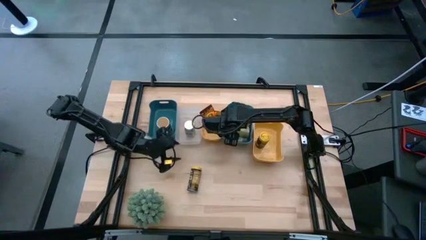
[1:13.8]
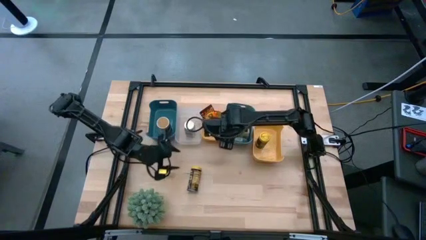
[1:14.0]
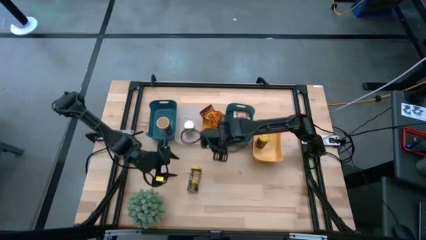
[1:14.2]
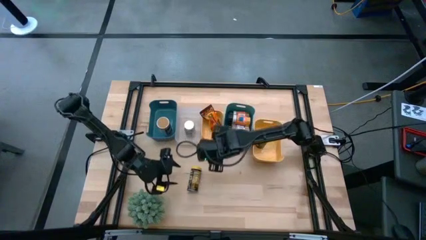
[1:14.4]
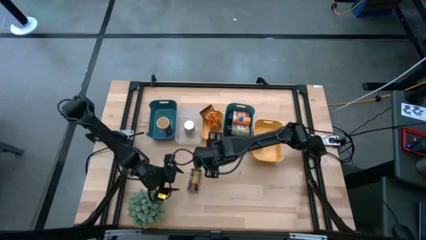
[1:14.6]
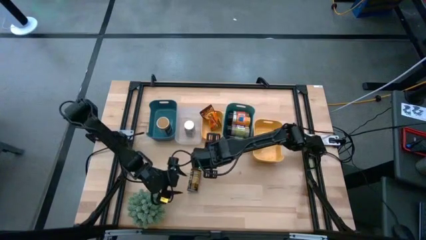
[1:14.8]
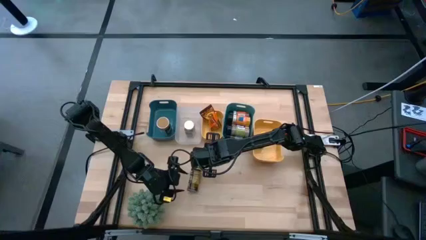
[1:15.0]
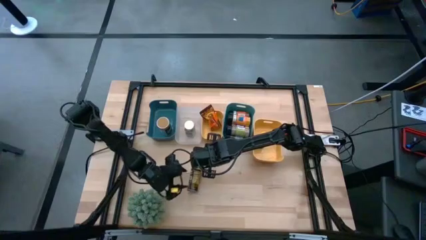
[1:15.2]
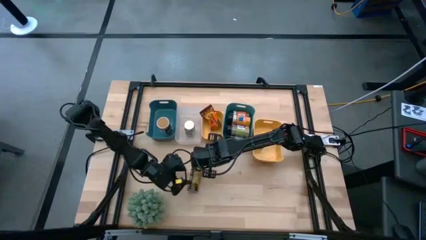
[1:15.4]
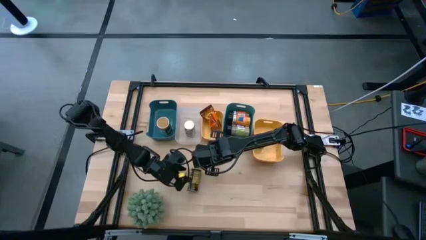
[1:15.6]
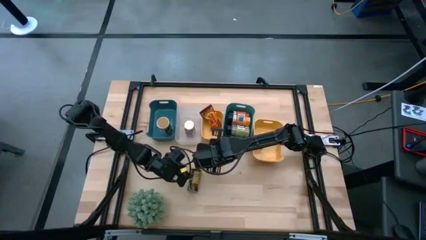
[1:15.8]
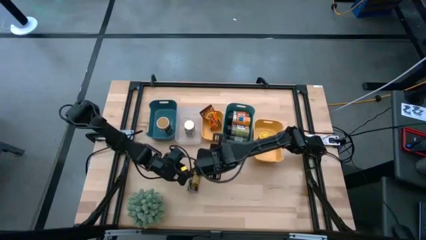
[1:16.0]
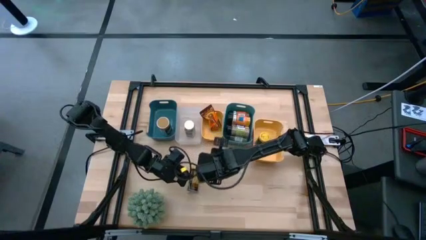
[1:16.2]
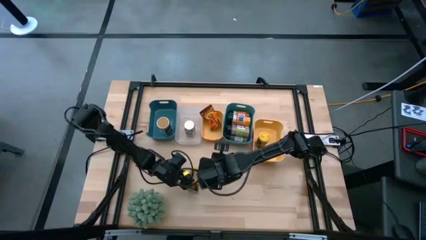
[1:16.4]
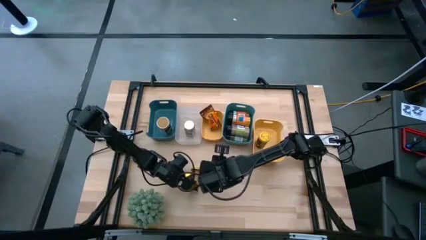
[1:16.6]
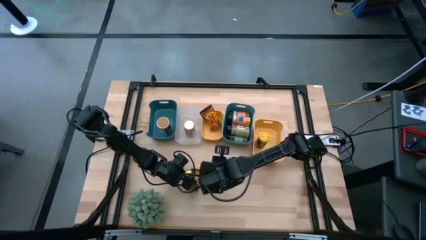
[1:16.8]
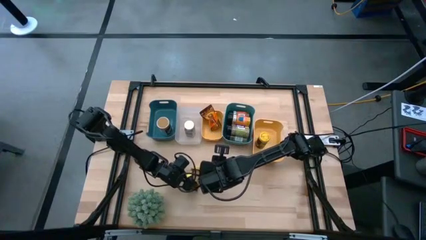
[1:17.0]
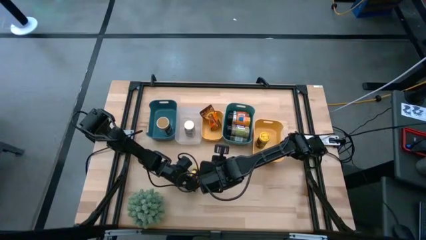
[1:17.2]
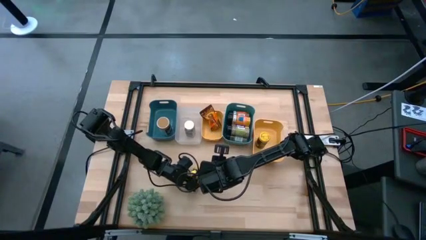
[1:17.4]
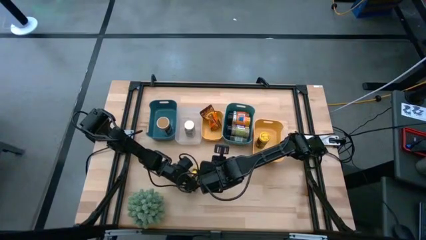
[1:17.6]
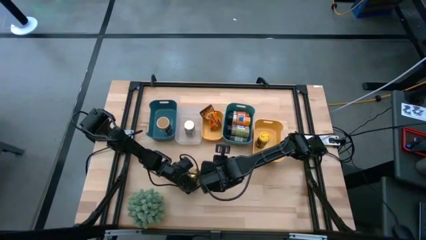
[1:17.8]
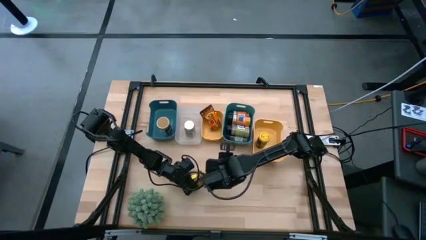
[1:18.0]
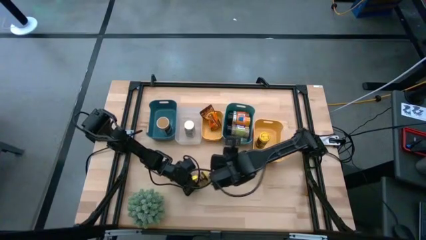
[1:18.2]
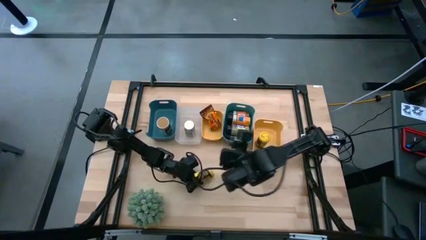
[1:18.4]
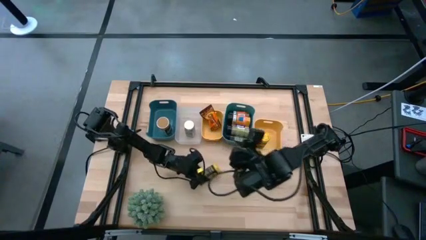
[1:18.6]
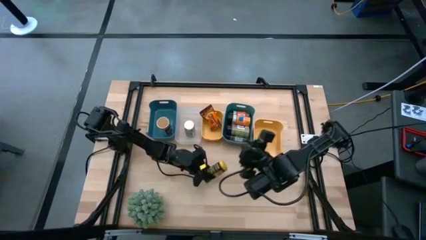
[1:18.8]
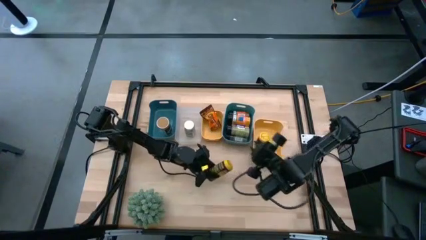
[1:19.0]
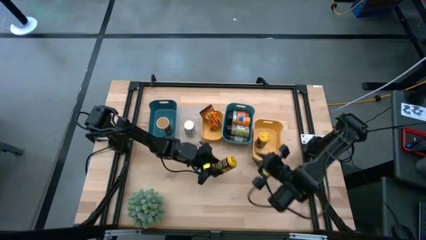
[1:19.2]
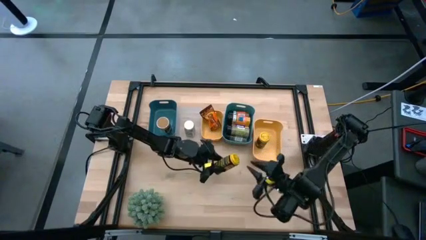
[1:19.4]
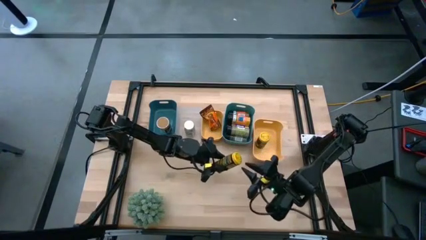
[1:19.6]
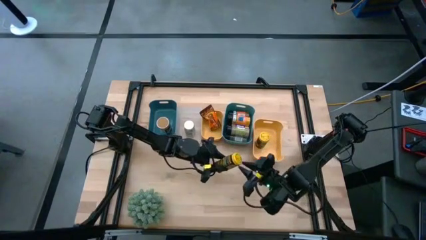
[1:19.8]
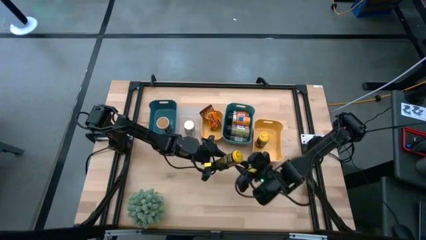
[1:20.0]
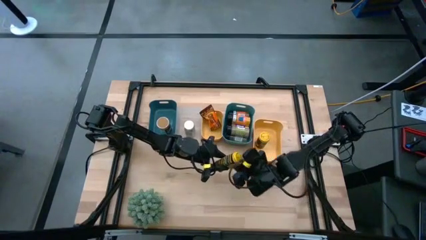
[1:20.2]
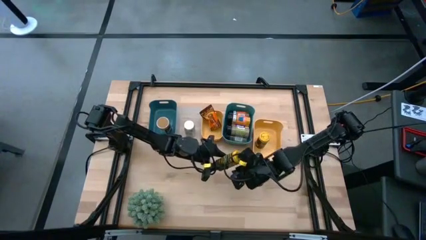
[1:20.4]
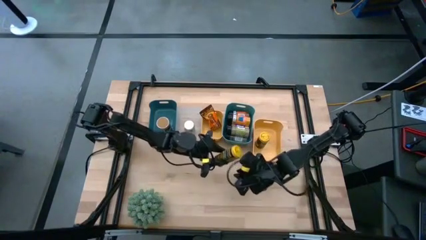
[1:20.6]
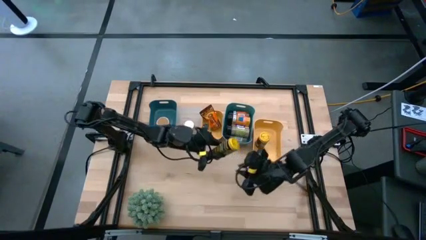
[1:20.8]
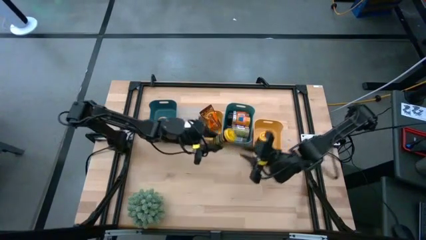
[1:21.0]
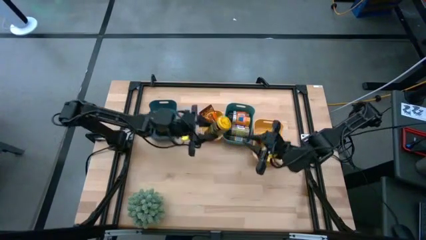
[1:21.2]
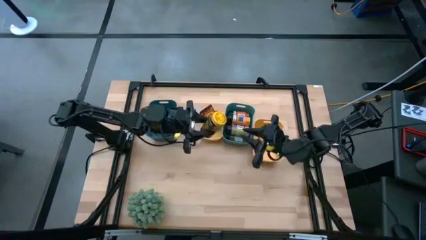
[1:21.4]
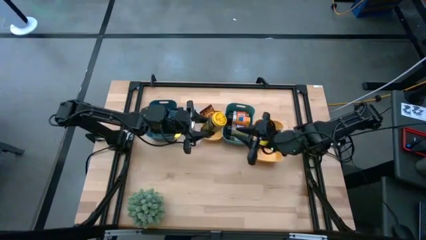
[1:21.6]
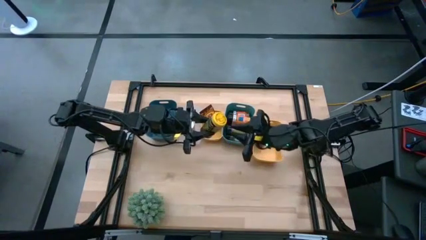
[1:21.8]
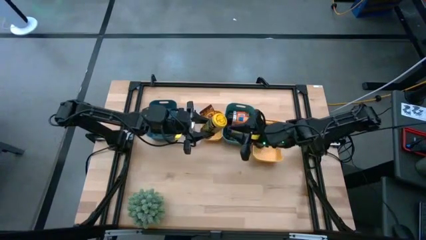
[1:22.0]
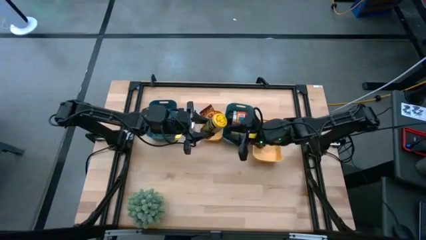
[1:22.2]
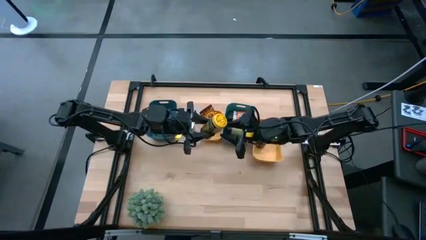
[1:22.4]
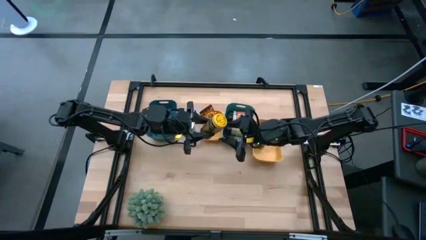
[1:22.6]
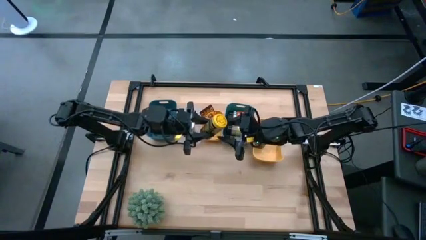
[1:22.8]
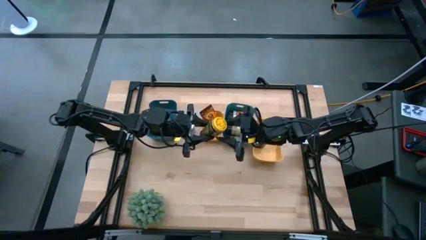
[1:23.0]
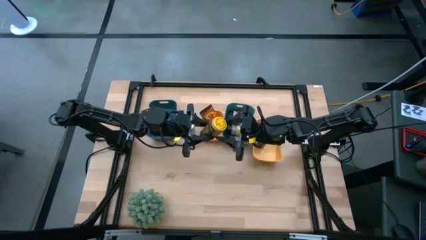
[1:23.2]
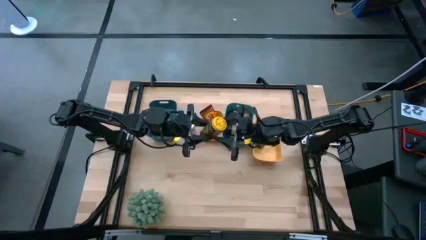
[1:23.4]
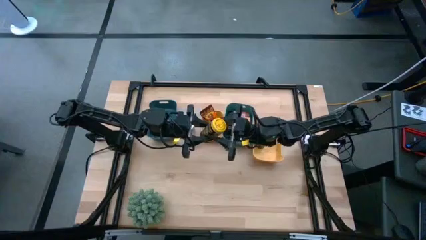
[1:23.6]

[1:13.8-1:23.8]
Task: Sort spices by type
Put the yellow seasoning can into the right yellow bin
